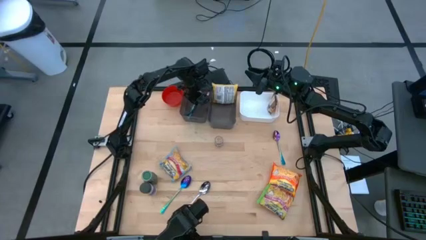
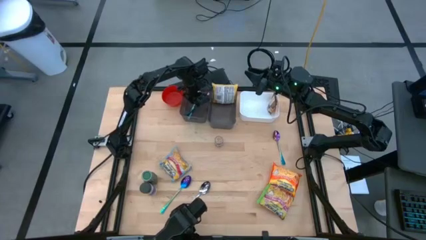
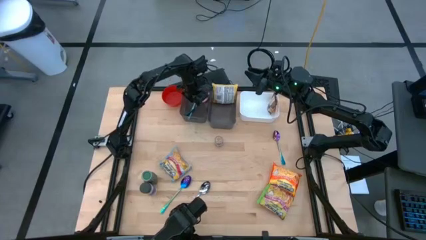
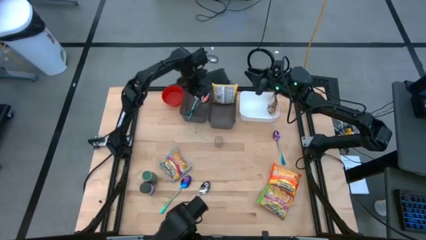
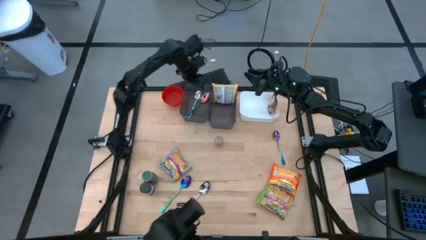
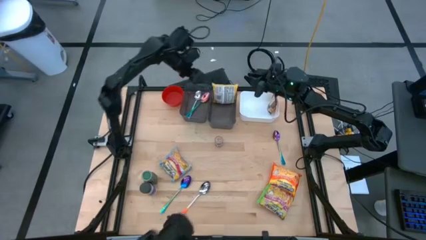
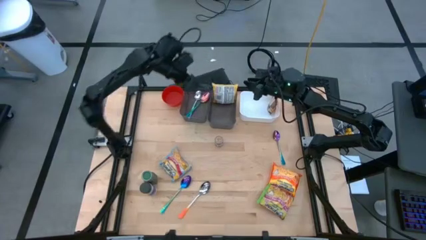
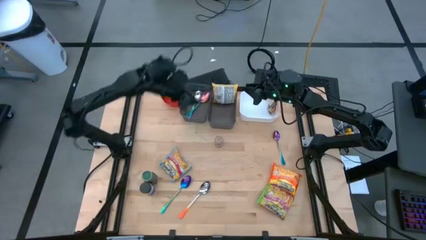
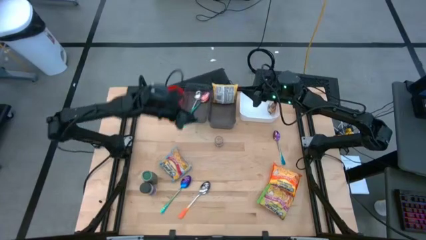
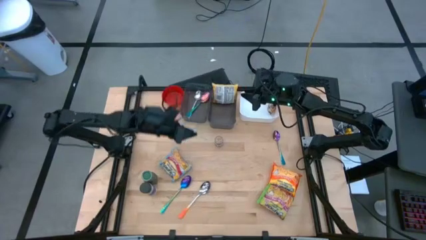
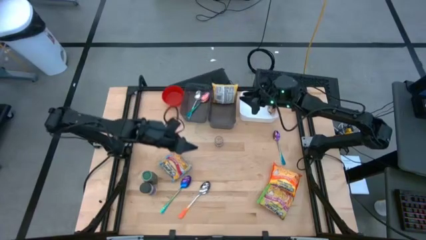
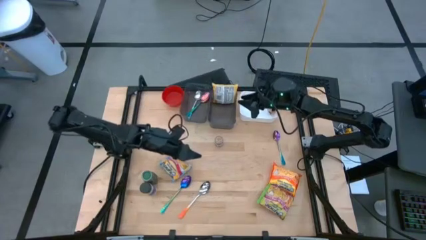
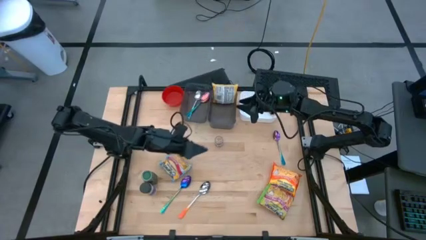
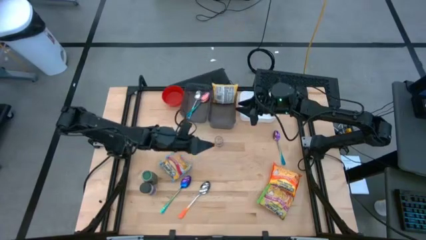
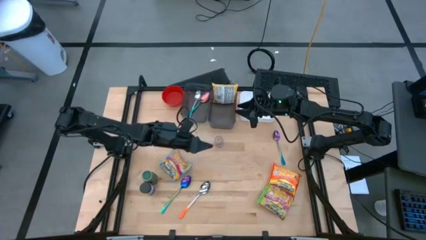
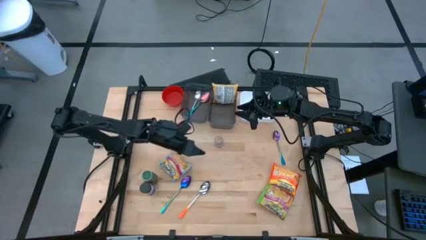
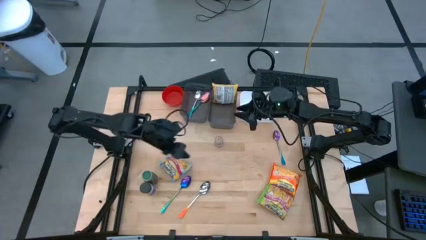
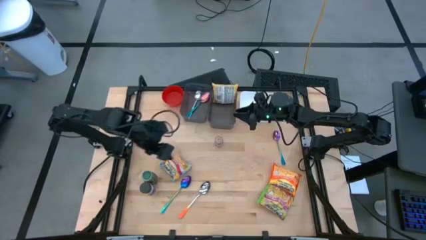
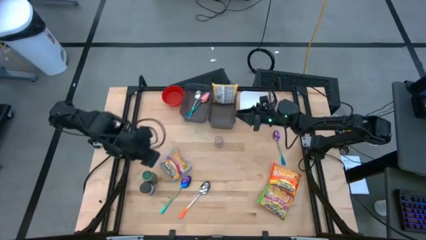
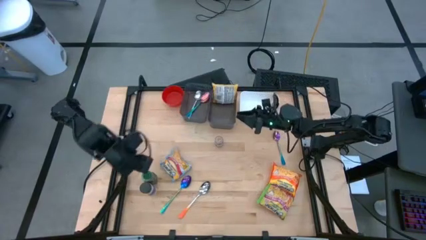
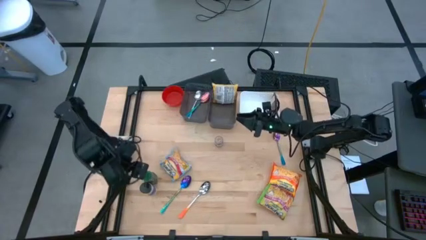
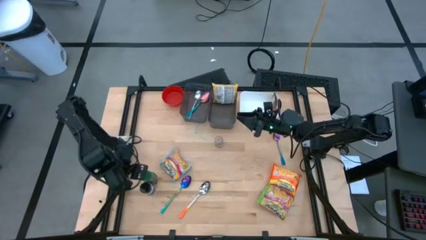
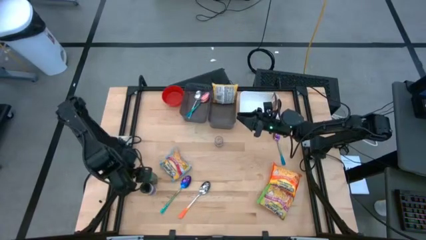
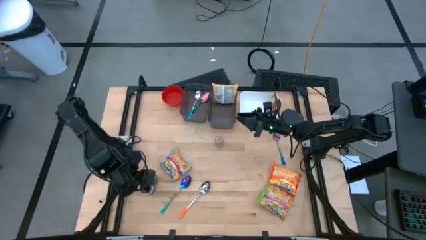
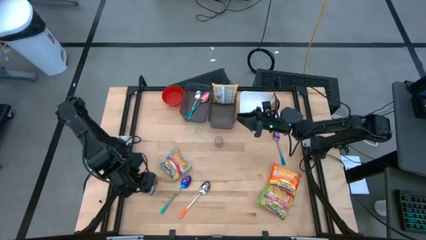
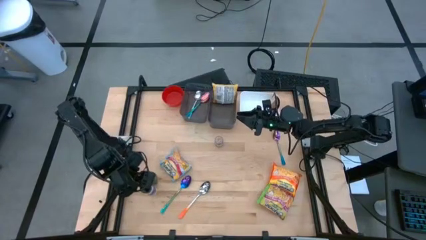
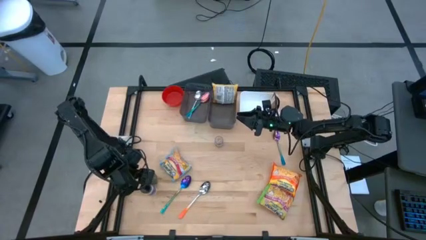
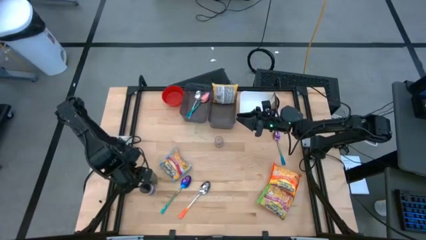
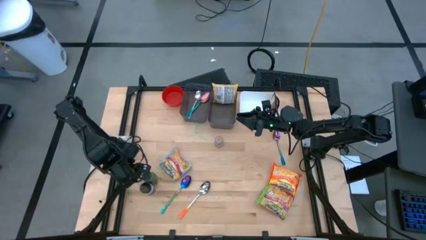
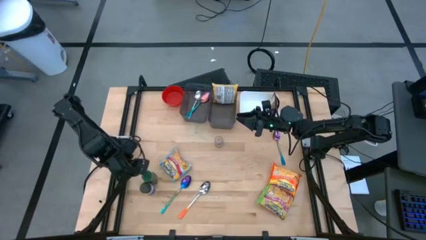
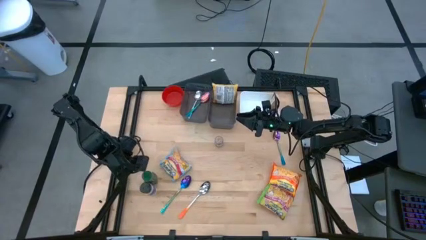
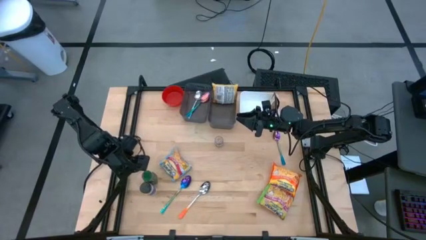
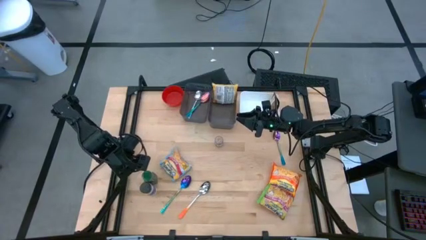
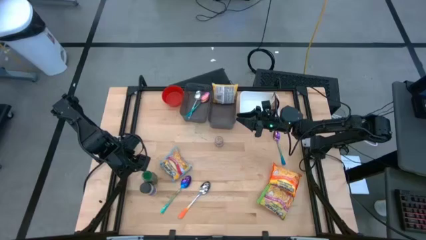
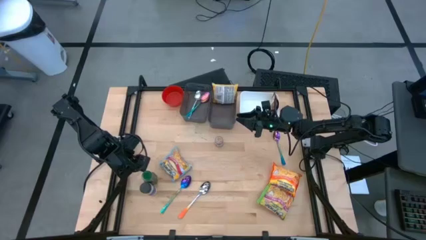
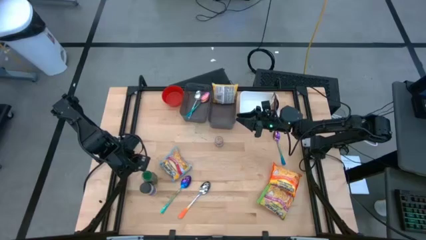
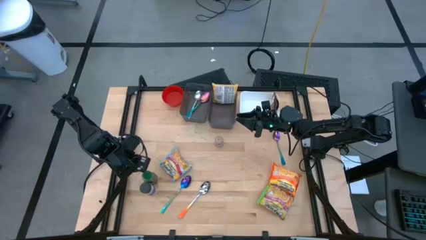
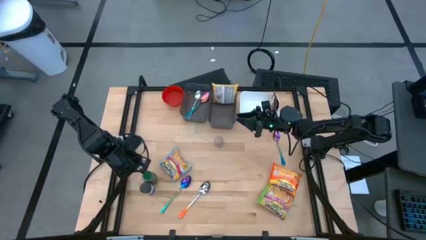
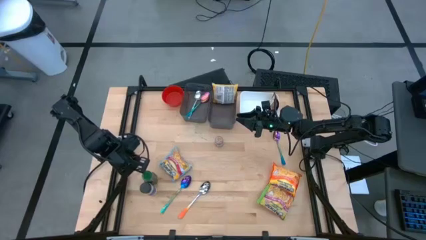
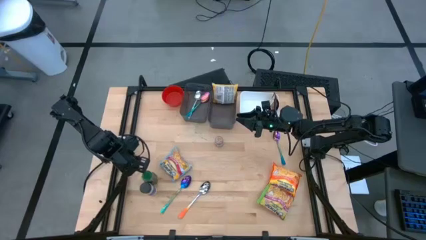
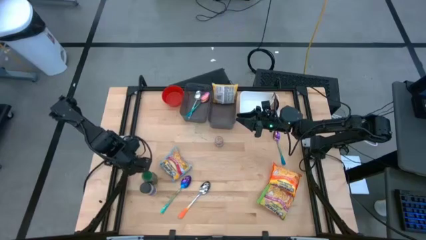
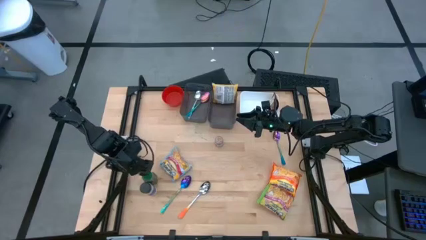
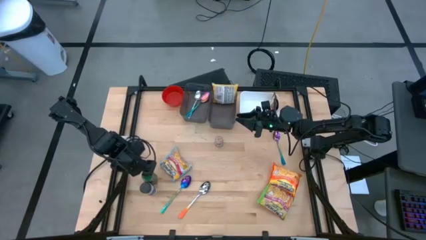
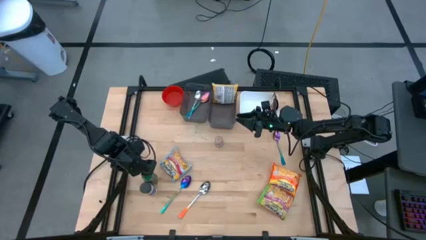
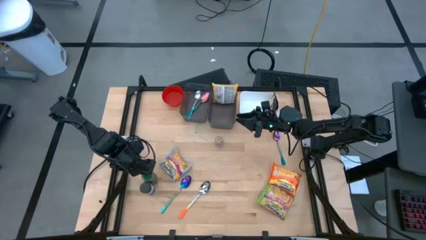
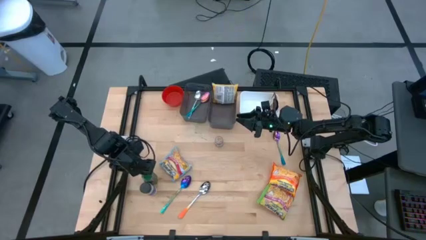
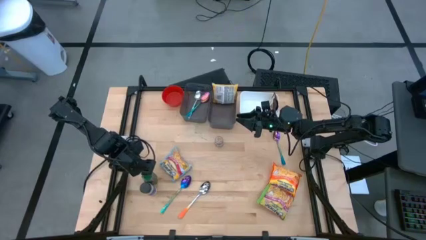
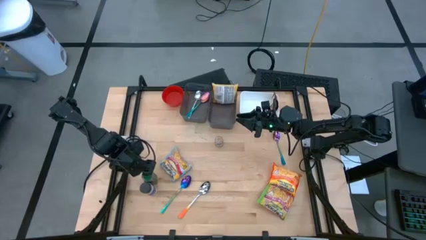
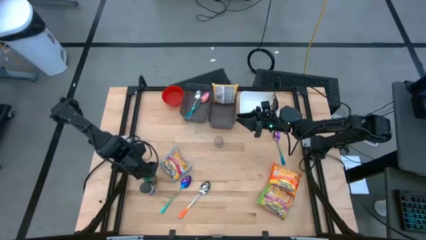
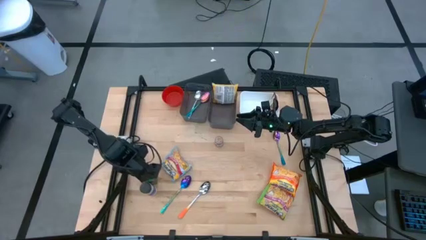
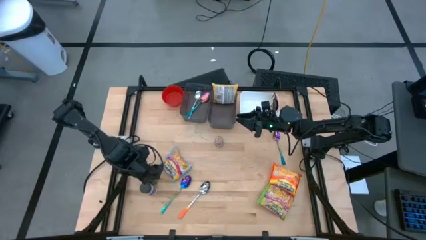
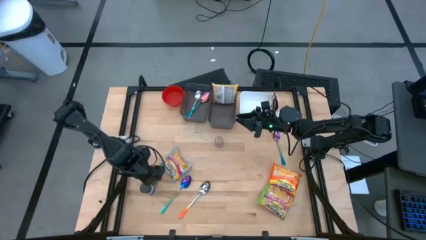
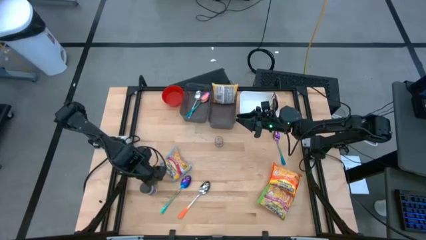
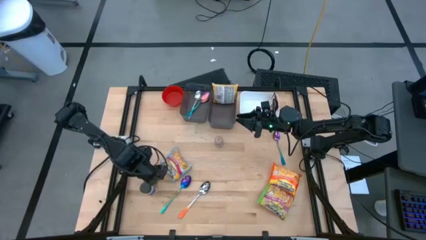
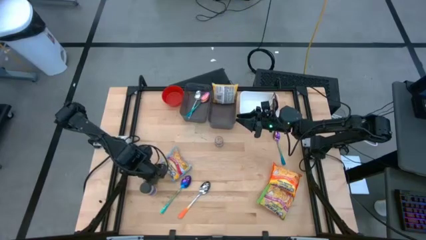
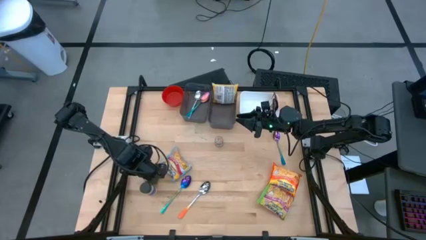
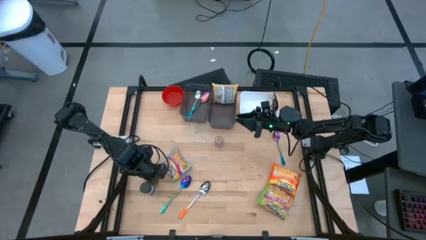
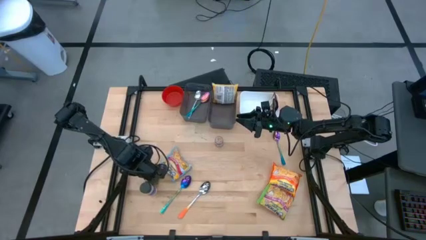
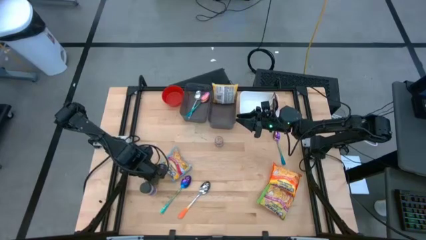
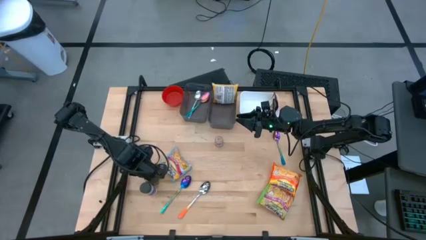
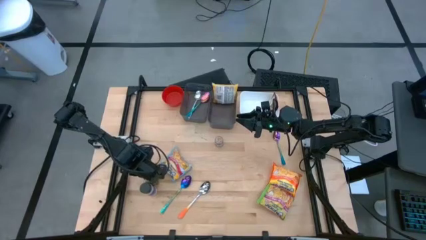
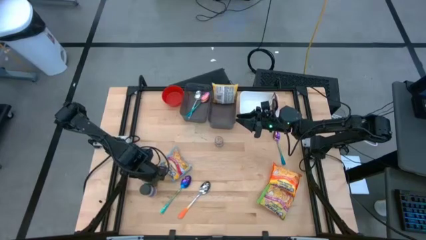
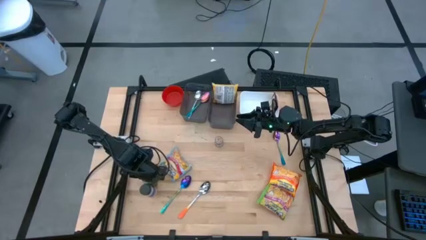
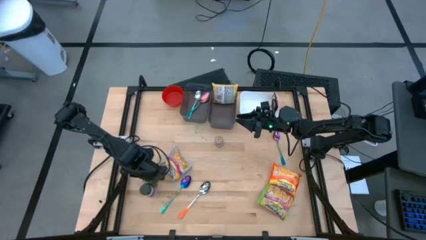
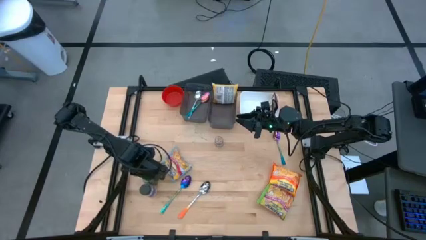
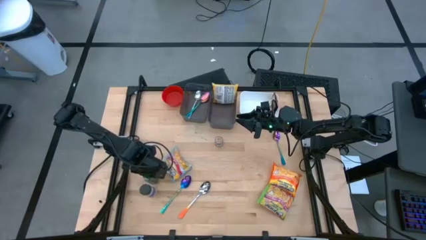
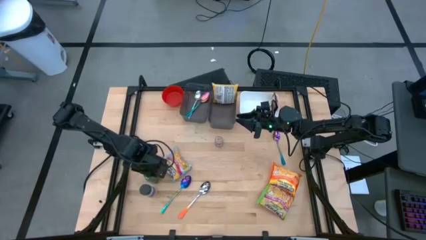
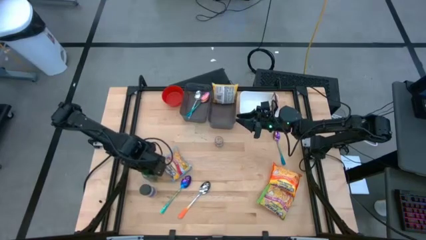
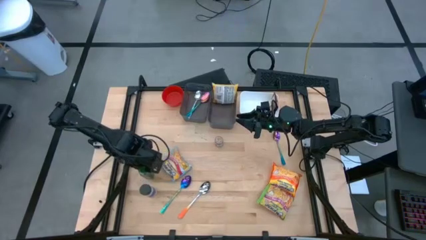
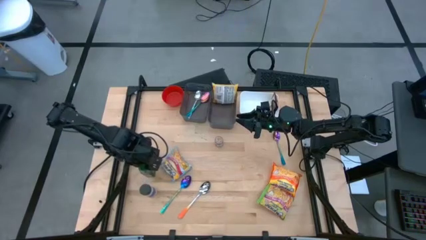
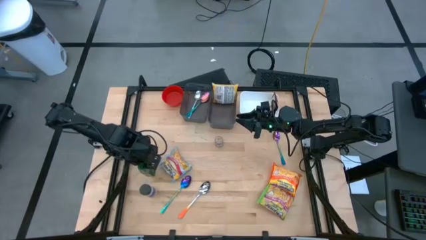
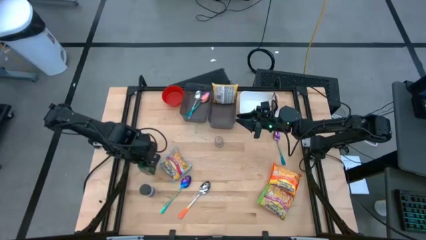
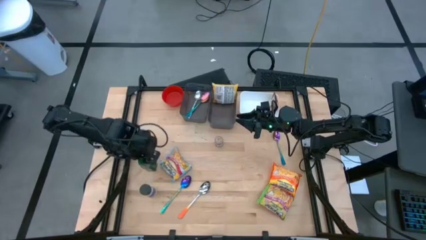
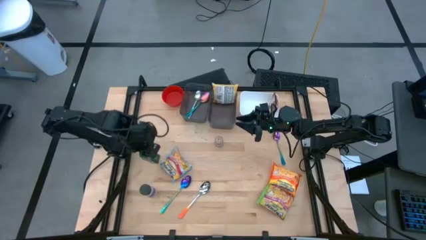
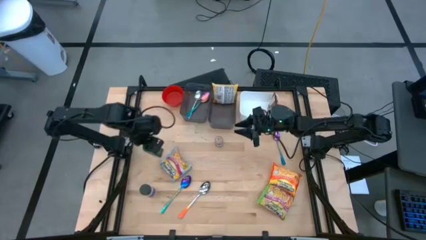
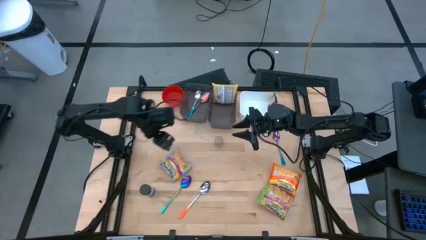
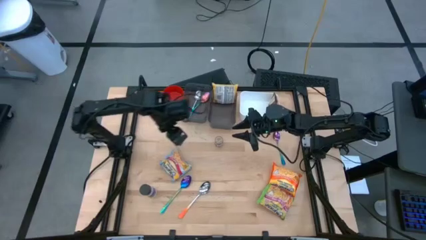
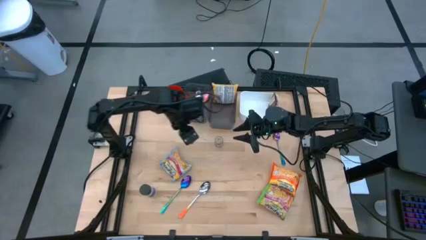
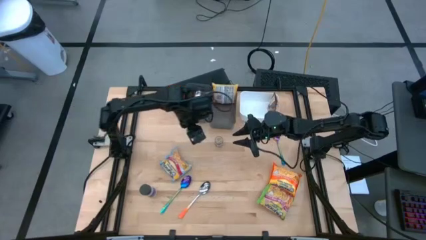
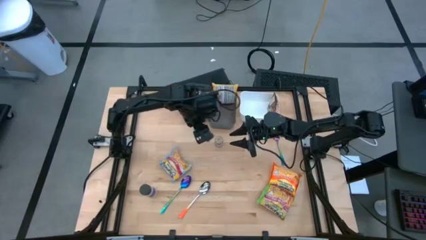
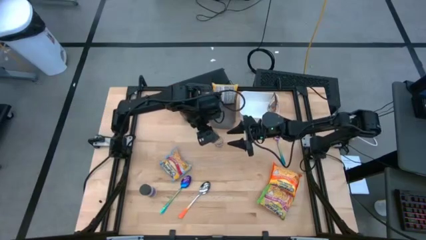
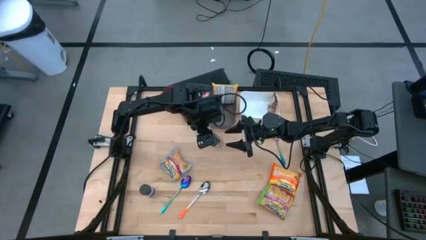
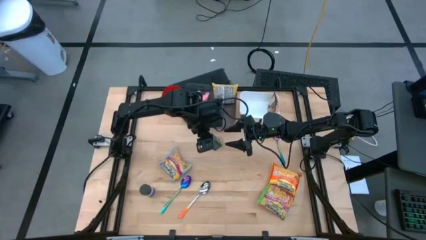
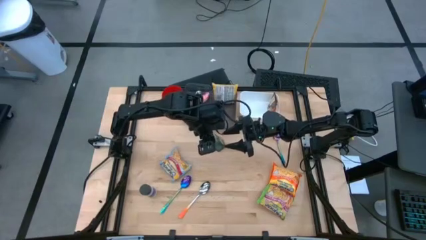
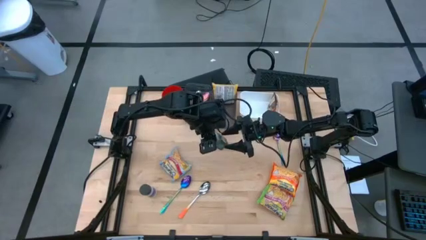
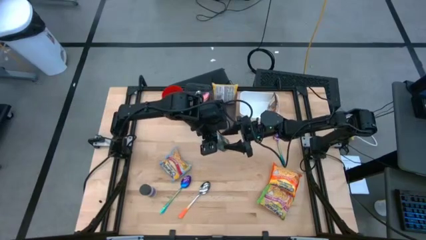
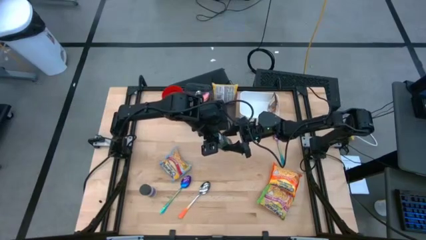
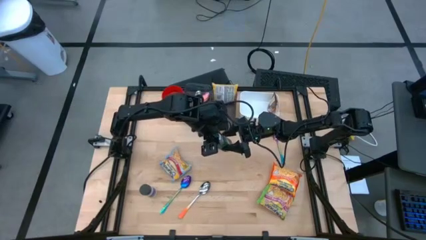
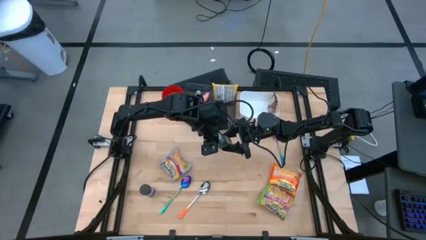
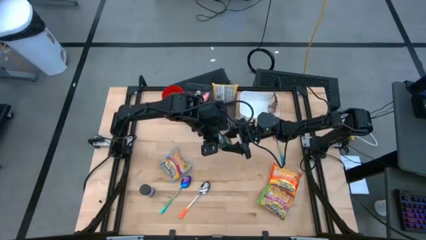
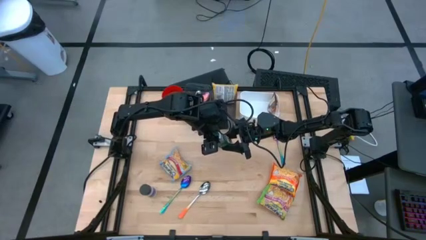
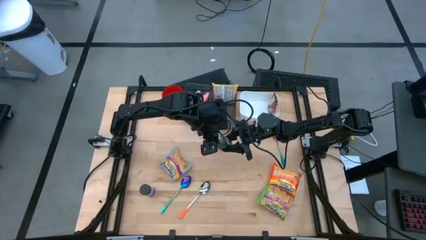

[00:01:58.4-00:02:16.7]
Task: Pick & Place Food Item
Put the green seasoning bottle into the white bin
